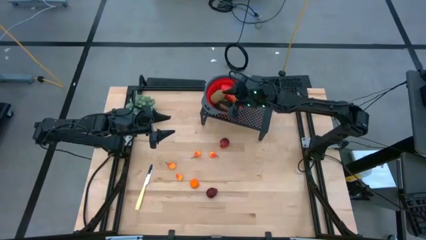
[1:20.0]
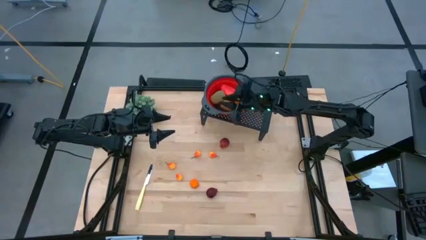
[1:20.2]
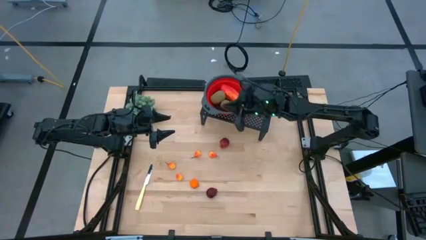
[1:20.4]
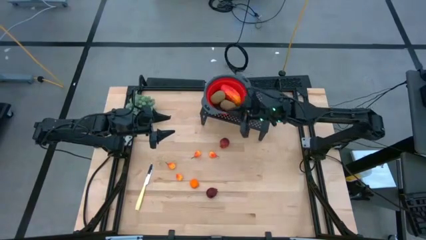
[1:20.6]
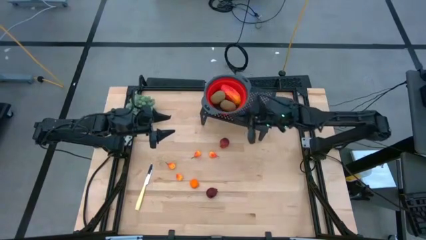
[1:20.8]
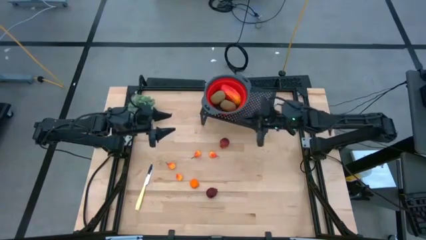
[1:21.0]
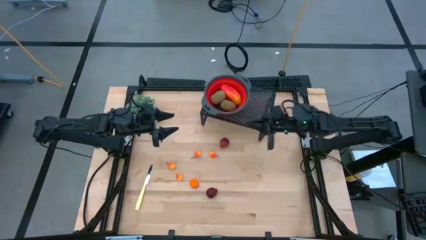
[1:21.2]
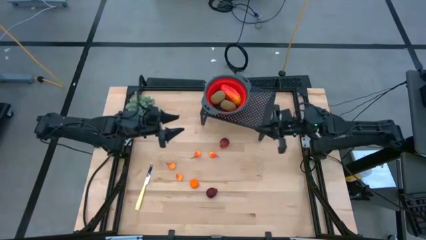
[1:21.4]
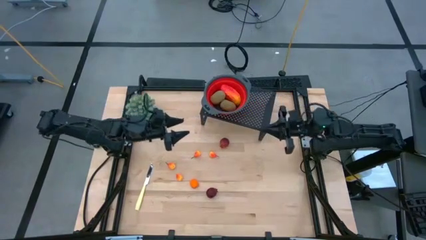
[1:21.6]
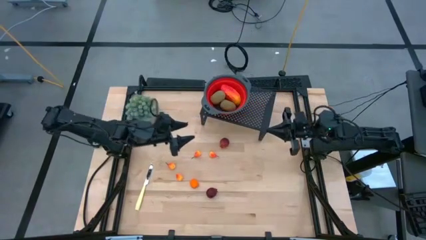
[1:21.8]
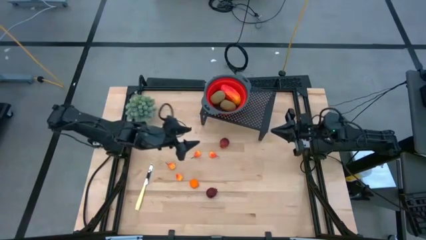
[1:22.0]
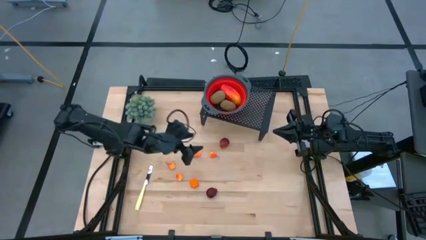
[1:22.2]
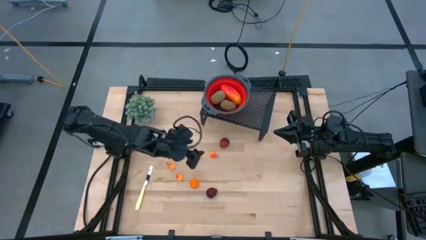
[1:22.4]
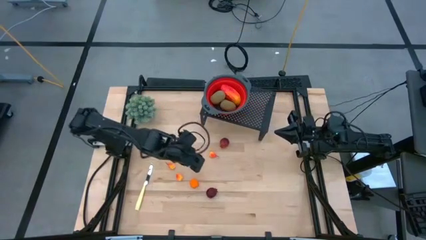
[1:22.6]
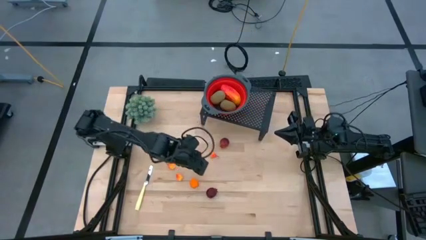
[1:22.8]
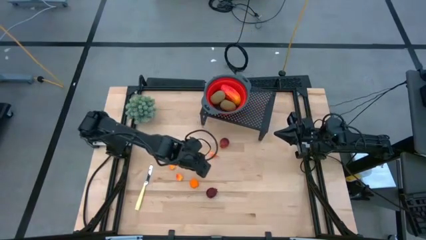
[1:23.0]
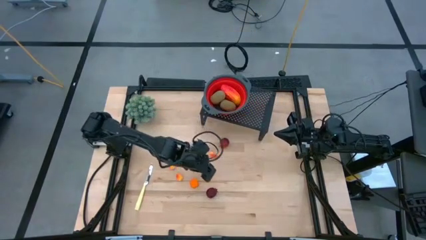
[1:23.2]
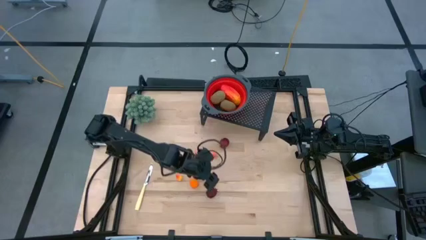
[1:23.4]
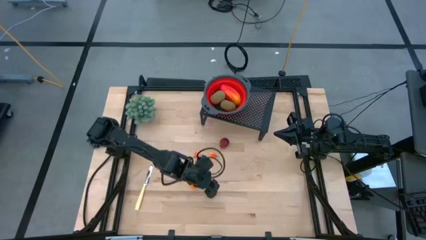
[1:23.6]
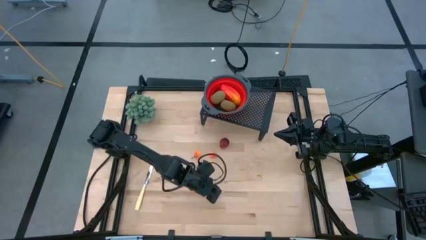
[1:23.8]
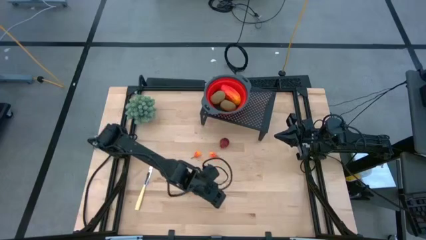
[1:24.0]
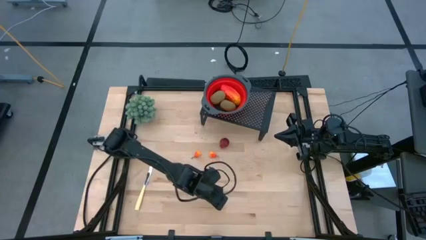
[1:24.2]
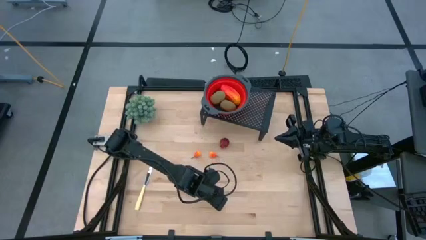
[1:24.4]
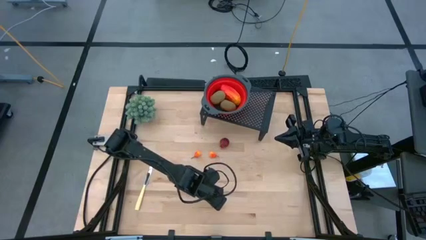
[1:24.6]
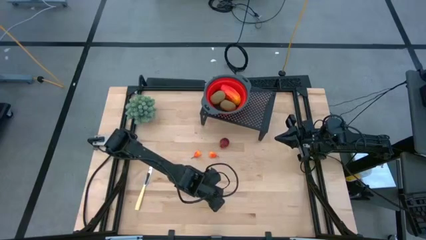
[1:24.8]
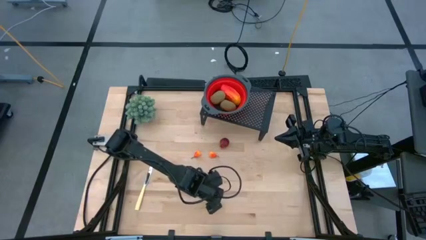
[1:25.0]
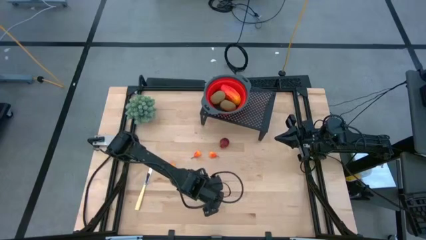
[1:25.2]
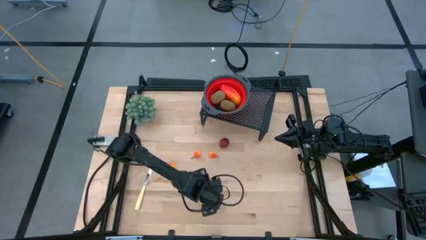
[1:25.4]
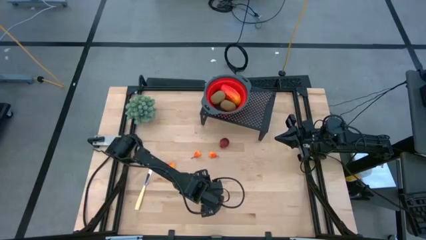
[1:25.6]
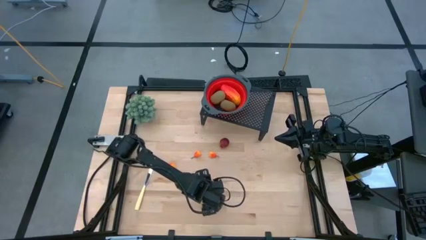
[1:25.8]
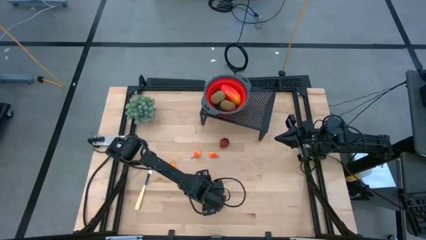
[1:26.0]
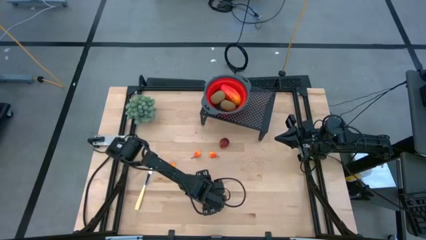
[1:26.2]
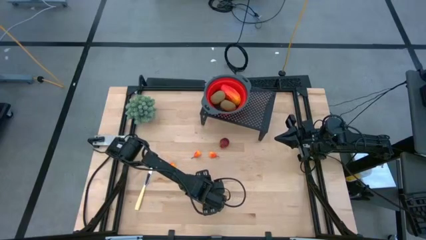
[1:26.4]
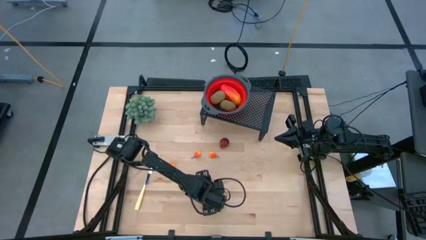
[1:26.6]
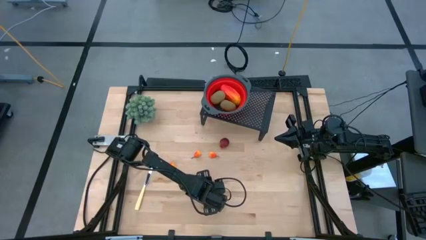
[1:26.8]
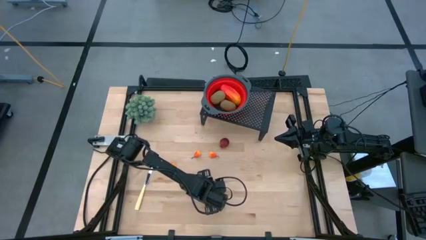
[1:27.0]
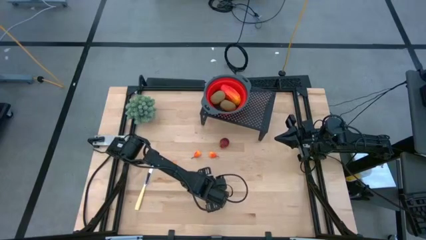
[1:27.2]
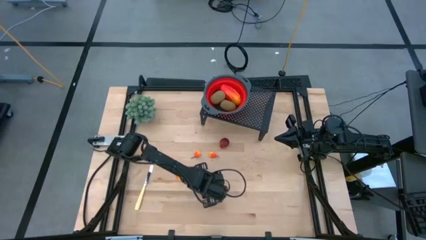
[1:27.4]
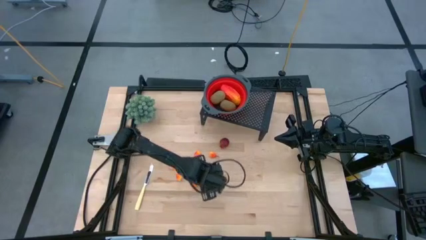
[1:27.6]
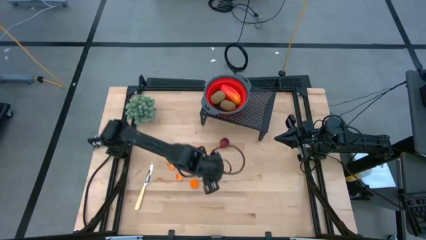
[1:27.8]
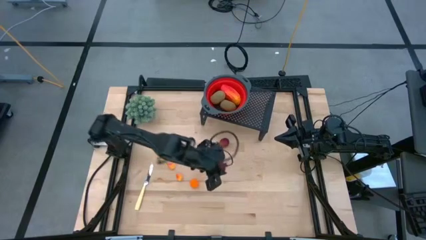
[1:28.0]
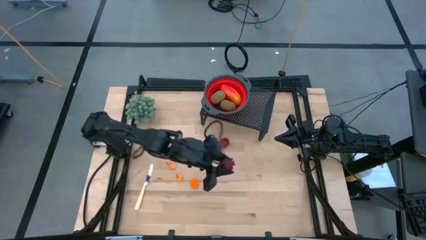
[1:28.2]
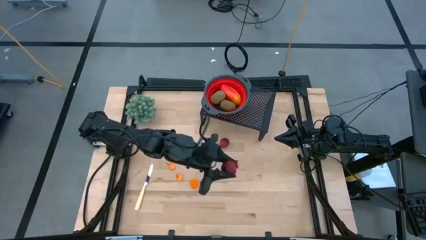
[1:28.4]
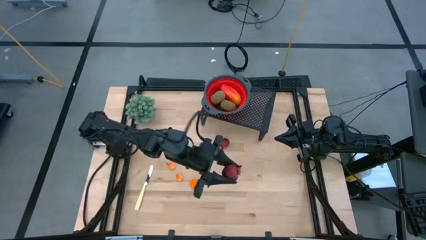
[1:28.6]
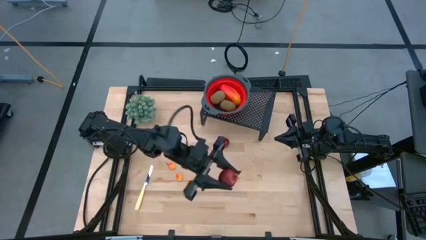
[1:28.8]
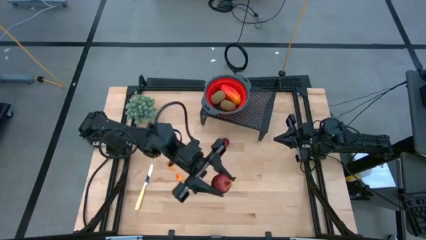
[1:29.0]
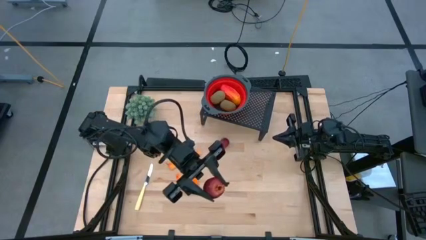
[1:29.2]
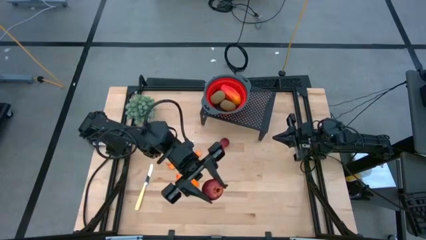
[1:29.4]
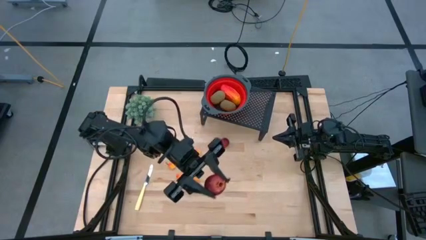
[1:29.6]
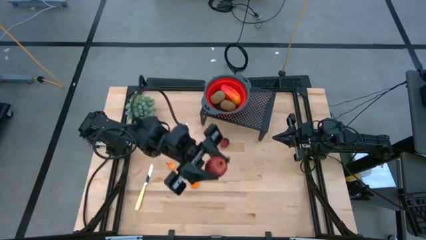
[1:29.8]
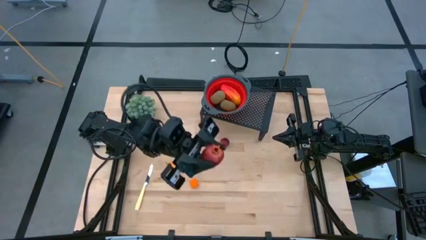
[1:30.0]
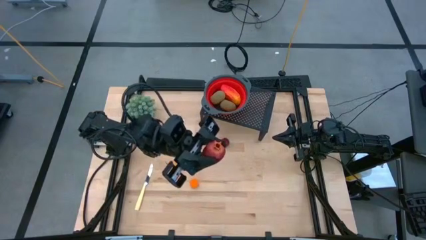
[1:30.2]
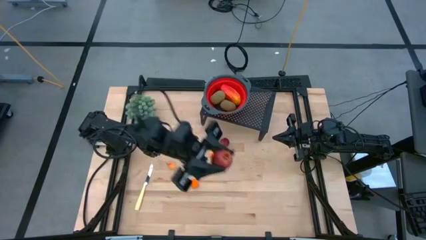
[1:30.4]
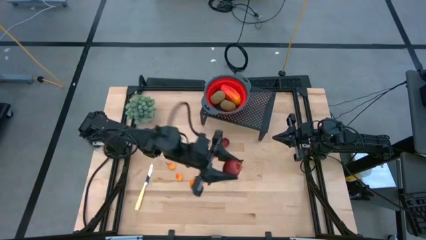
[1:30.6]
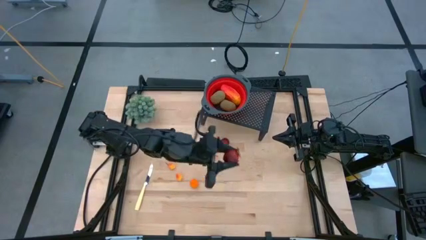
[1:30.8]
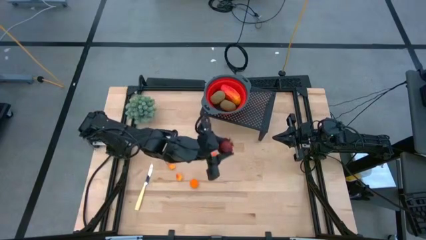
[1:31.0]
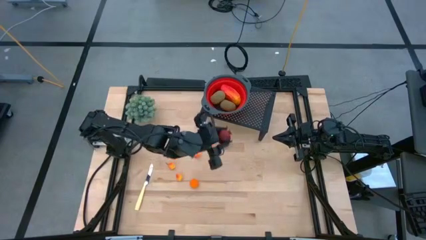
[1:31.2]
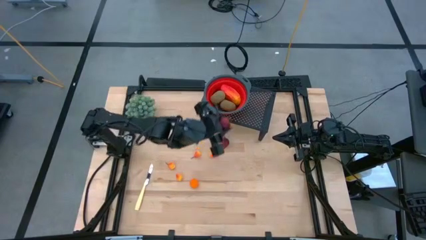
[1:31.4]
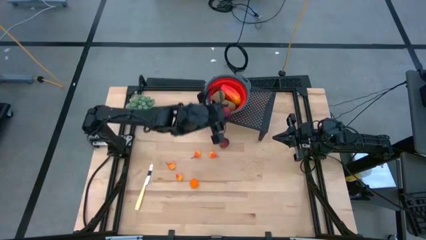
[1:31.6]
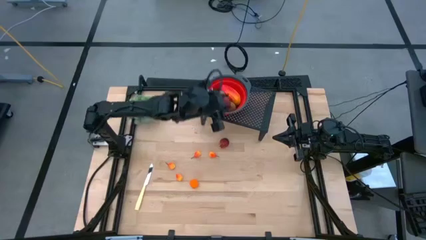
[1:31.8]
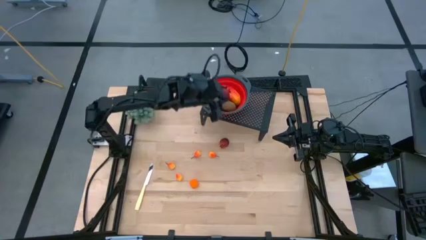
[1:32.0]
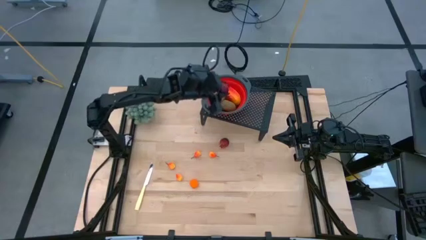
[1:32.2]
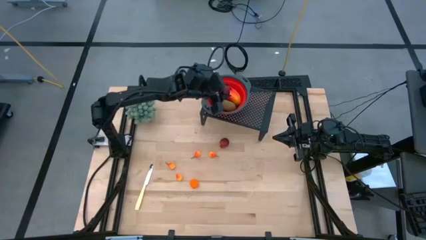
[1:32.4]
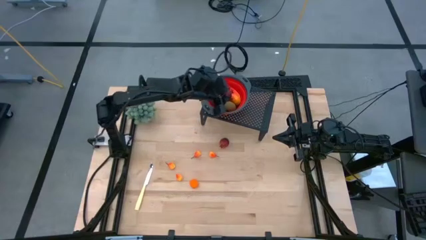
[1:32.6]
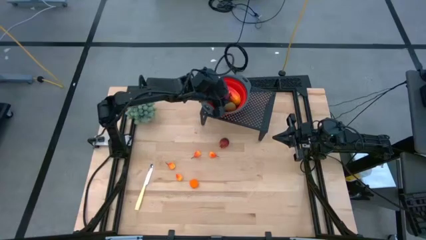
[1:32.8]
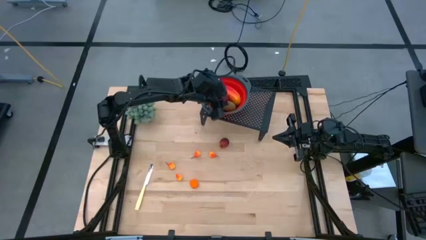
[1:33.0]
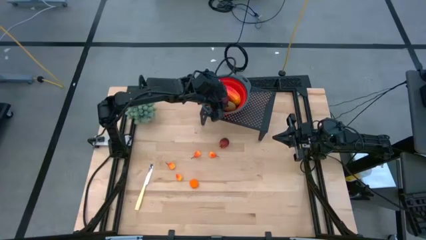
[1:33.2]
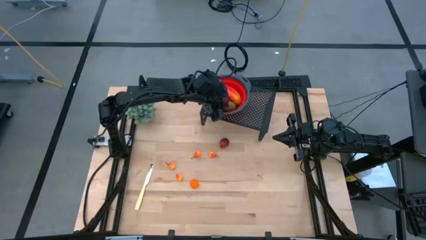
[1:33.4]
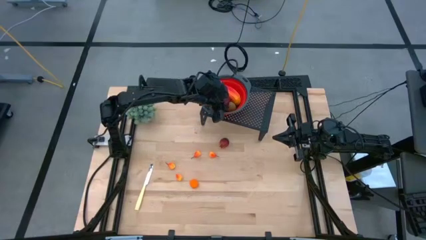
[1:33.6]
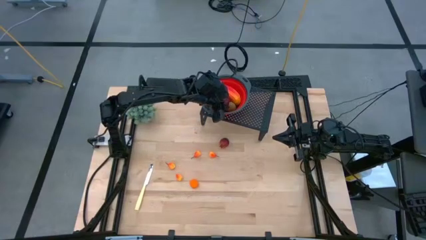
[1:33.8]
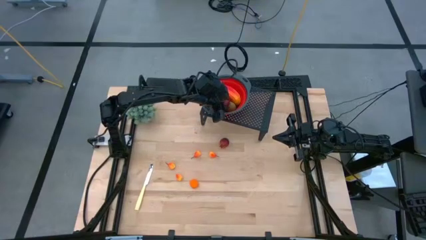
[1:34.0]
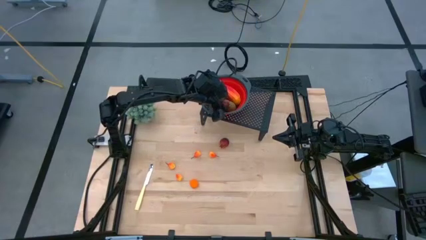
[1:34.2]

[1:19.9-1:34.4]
Task: Pick & Place Fruit
Put the bottom pomegranate into the red strainer bowl on the shelf
